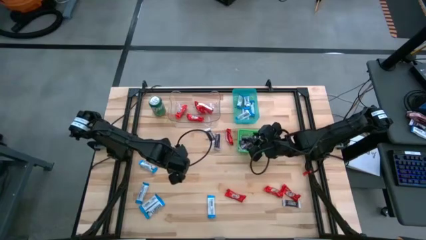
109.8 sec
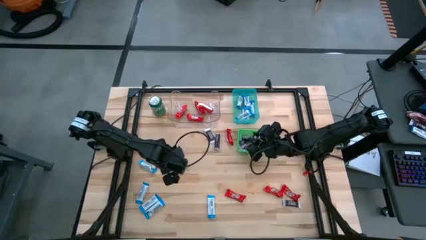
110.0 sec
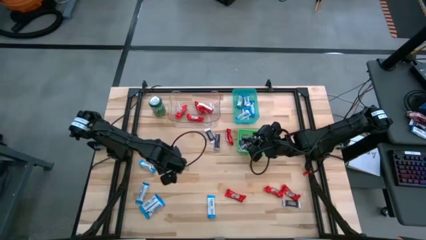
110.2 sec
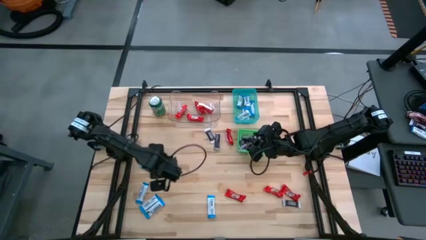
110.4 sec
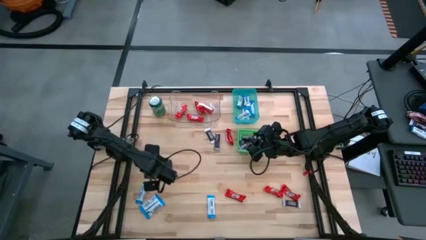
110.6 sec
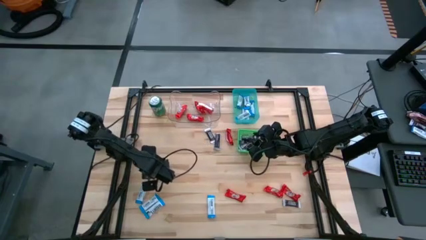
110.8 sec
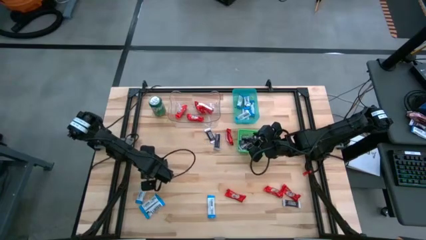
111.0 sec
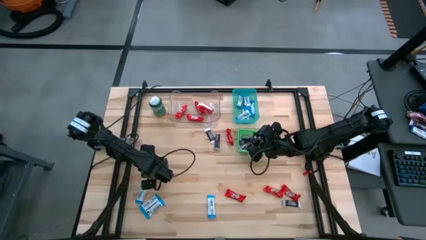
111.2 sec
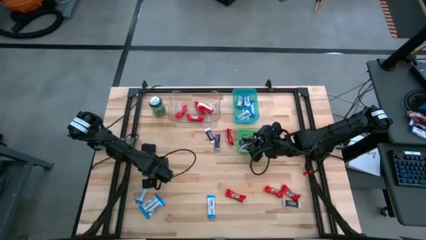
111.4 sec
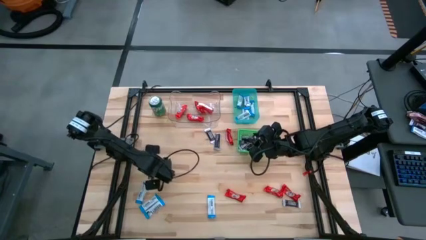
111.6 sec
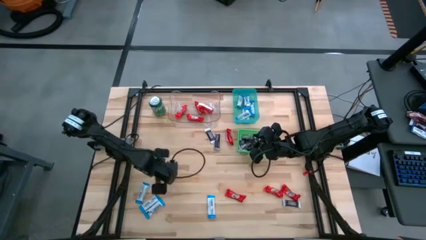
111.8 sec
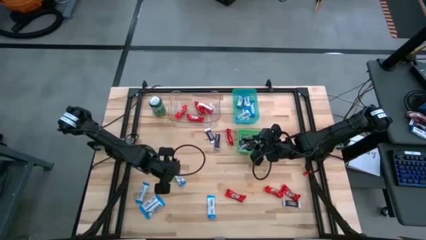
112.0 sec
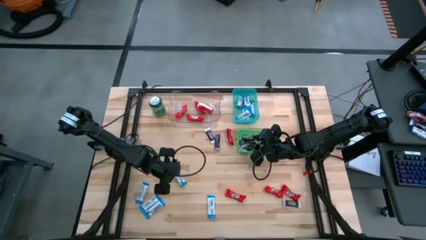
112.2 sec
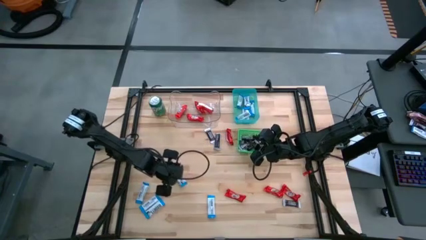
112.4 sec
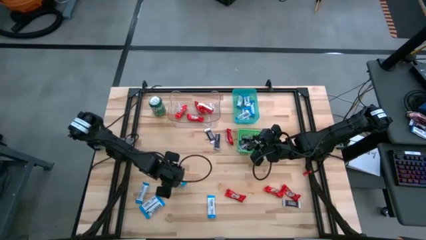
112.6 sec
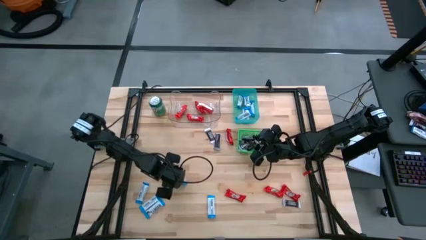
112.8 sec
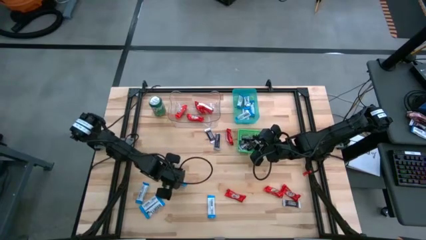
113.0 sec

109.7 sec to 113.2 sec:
Task: Sort candy
Put the white chocolate bar into the blue bin

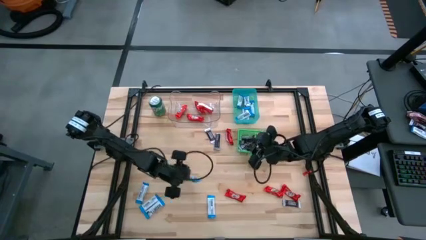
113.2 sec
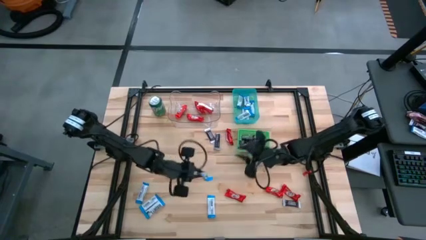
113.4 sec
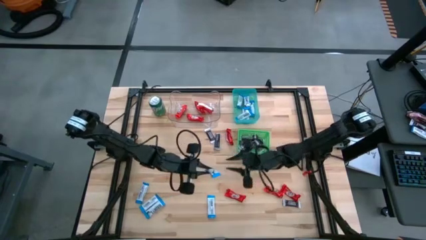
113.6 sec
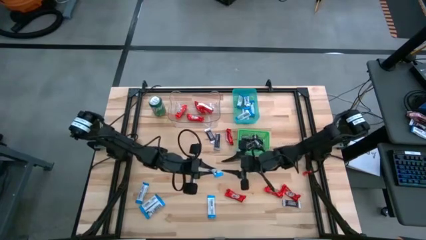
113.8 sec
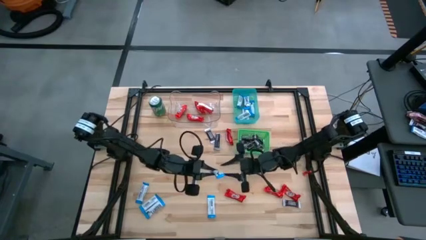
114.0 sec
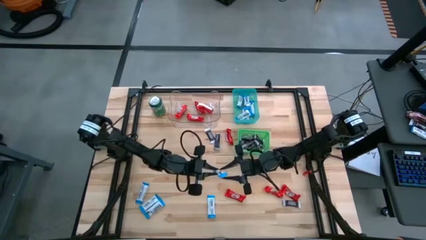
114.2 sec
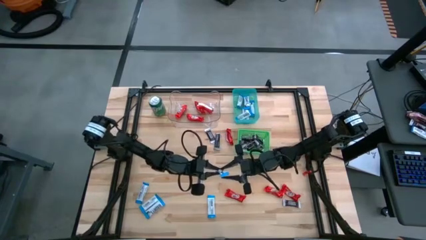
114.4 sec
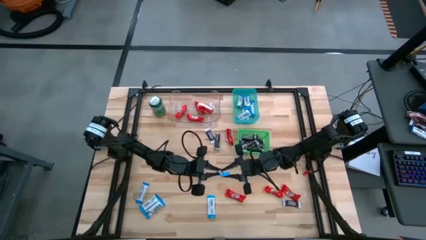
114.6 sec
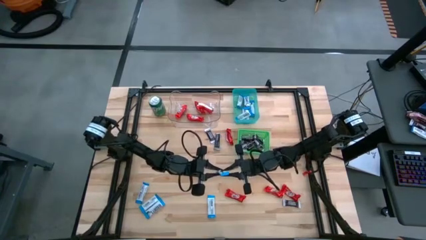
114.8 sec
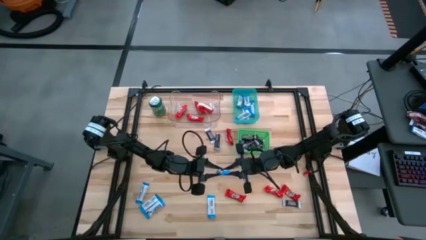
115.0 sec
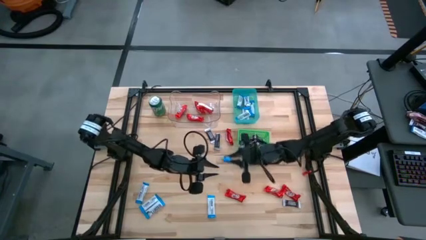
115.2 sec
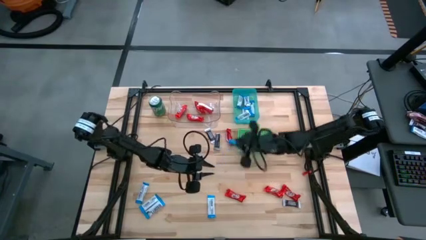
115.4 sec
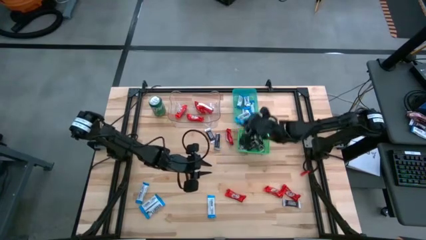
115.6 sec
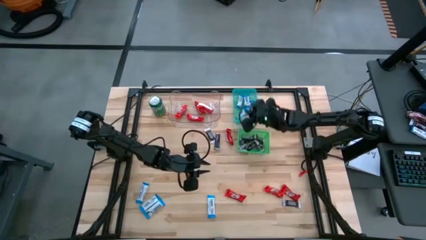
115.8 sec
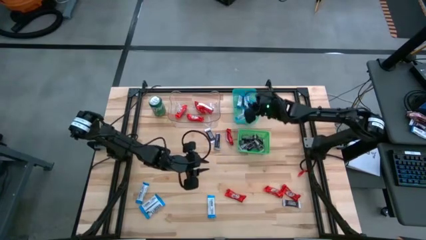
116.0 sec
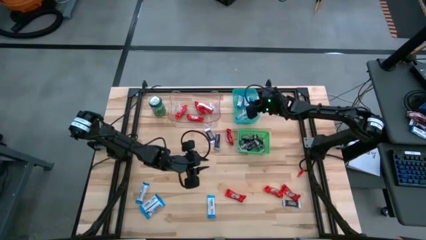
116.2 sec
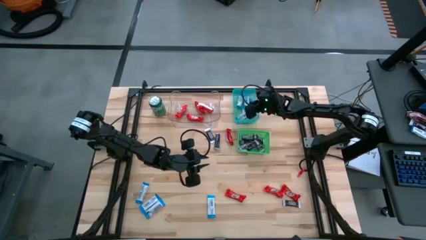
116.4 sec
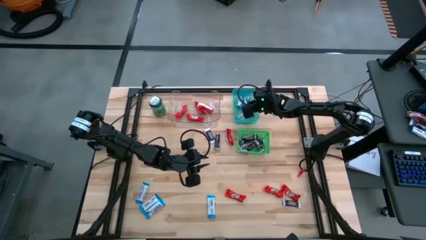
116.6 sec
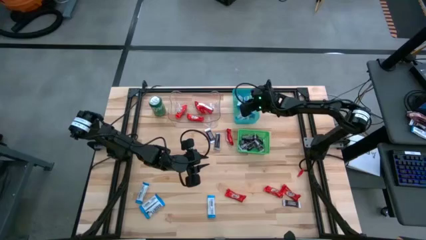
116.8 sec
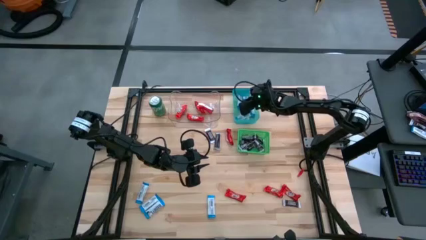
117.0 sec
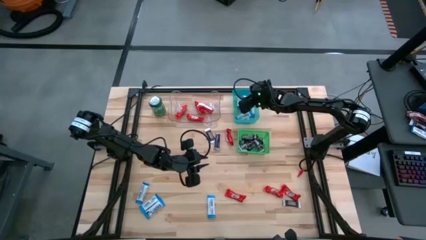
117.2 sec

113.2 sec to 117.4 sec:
Put the white chocolate bar into the blue bin

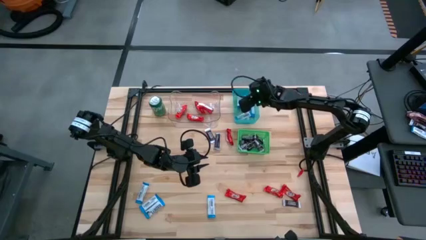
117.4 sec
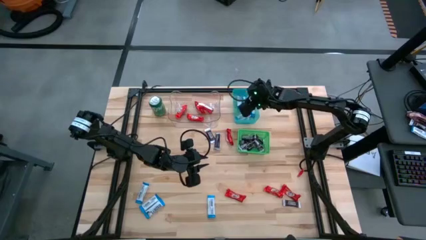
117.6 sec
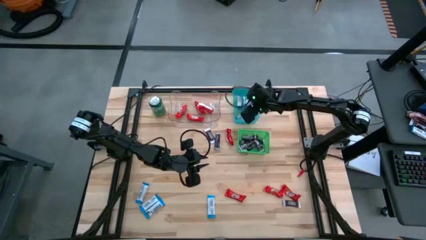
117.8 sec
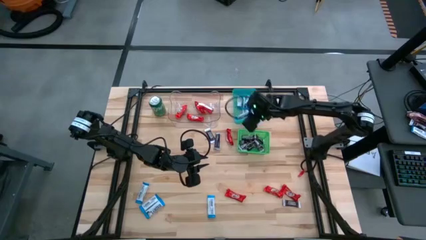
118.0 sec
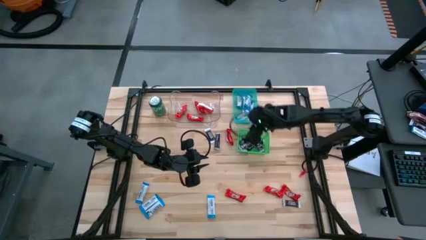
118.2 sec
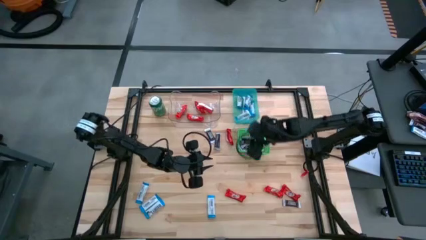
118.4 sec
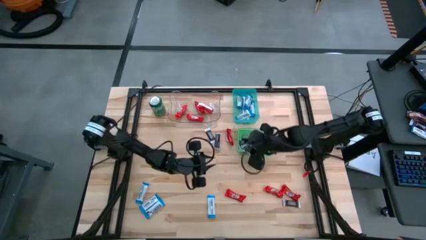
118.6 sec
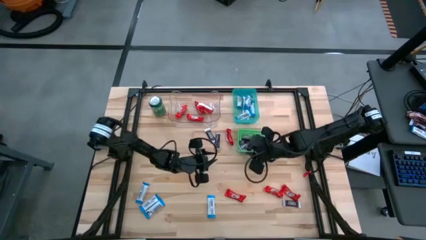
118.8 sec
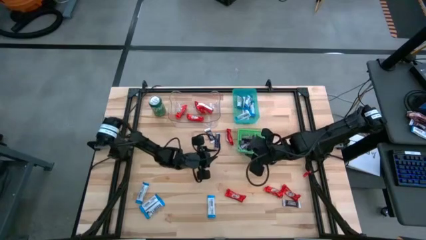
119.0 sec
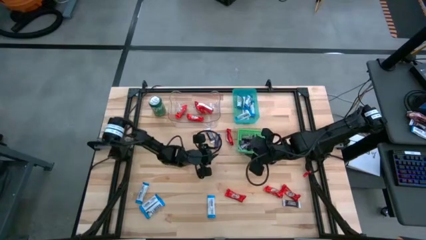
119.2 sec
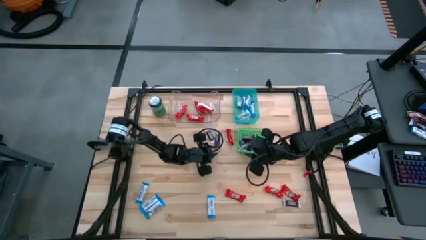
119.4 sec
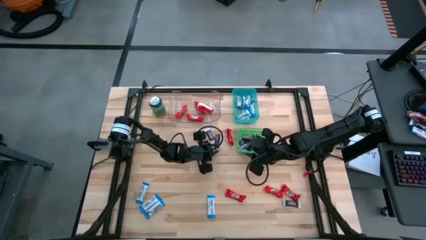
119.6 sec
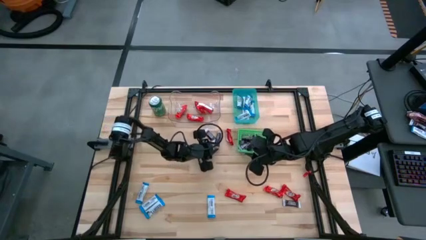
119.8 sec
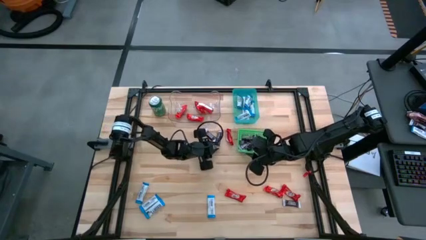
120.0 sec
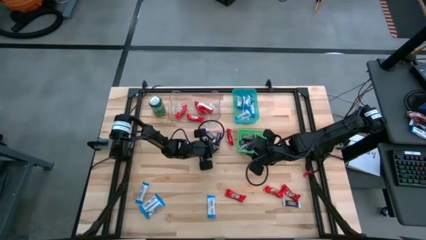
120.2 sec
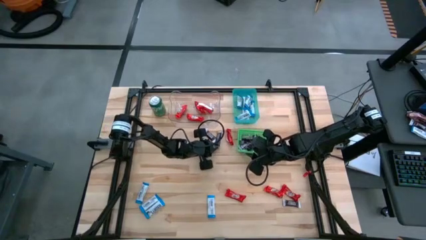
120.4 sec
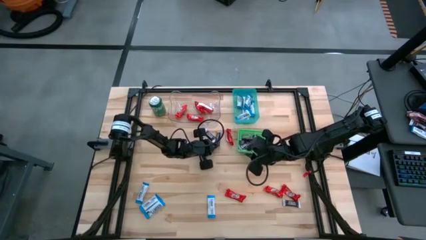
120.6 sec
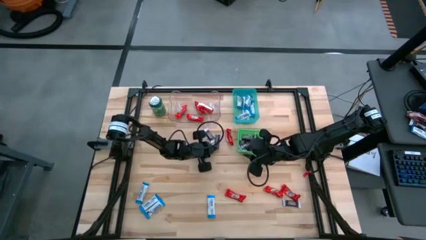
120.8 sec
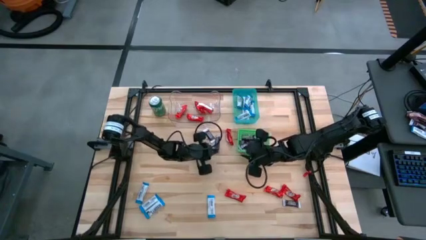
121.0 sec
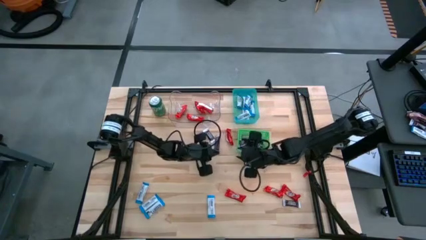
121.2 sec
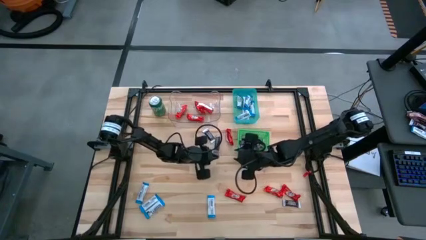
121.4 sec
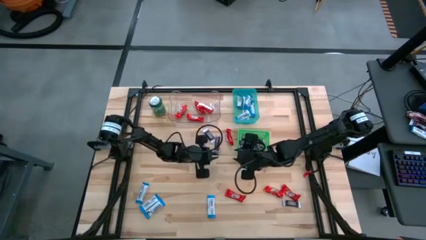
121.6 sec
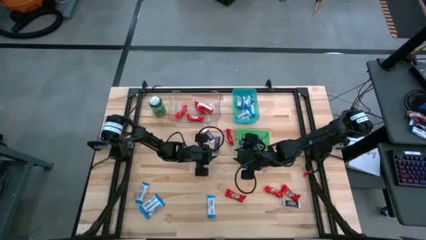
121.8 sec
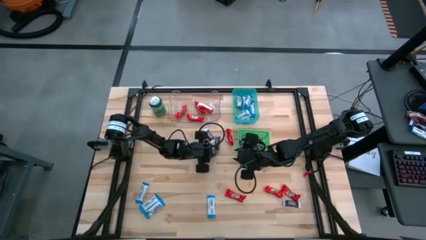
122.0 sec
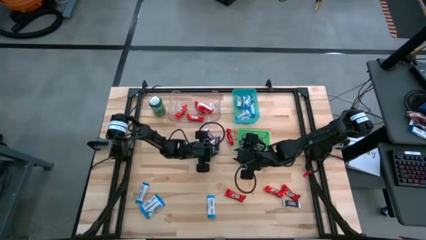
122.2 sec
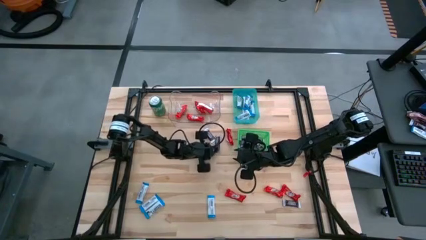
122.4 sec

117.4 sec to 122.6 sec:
Put the brown chocolate bar into the green bin

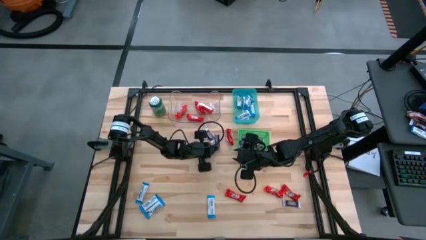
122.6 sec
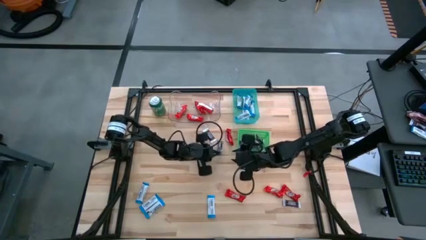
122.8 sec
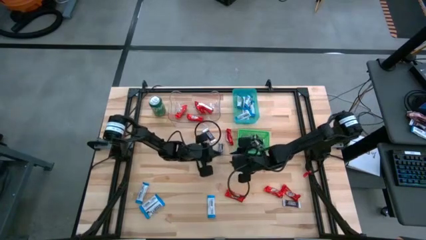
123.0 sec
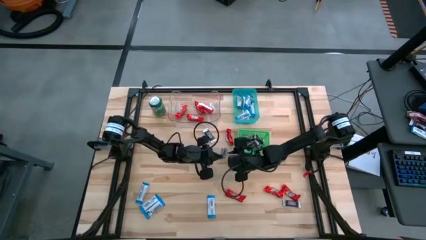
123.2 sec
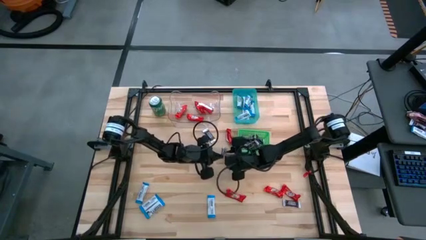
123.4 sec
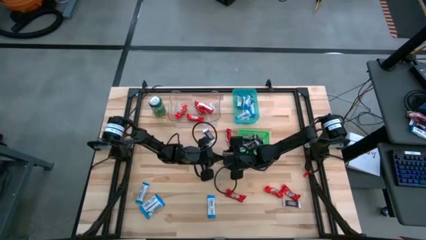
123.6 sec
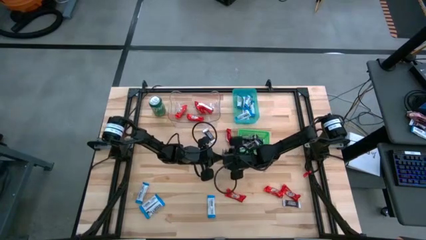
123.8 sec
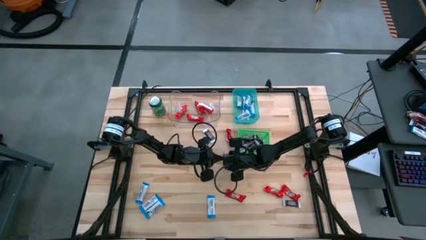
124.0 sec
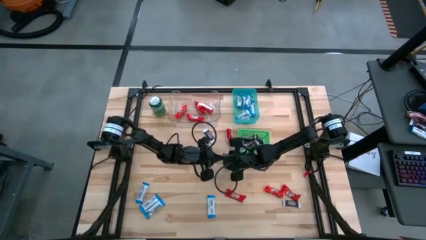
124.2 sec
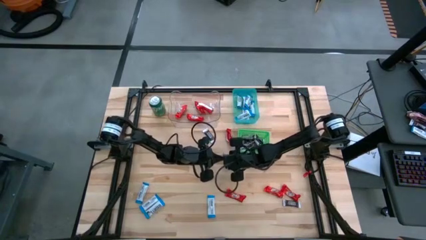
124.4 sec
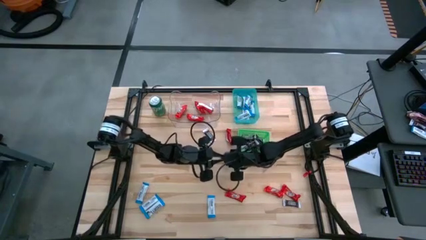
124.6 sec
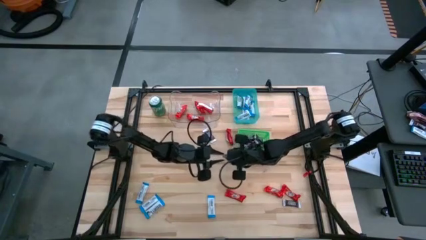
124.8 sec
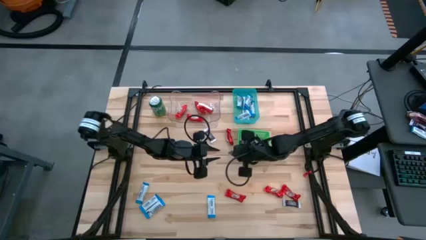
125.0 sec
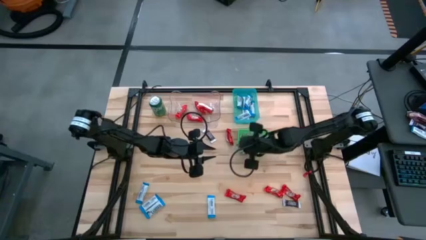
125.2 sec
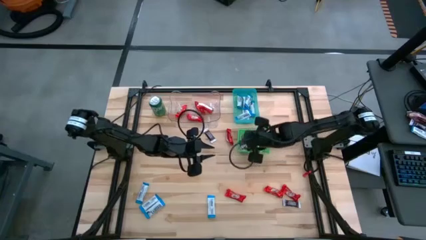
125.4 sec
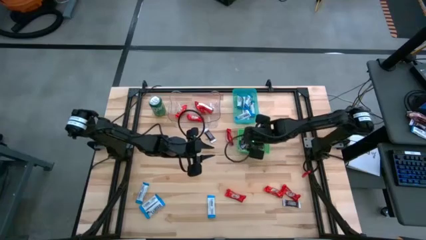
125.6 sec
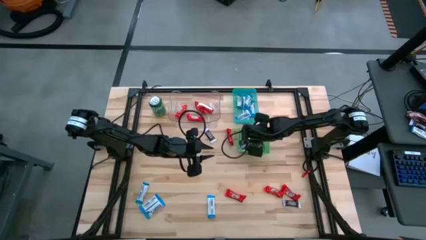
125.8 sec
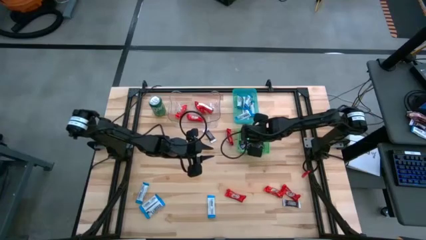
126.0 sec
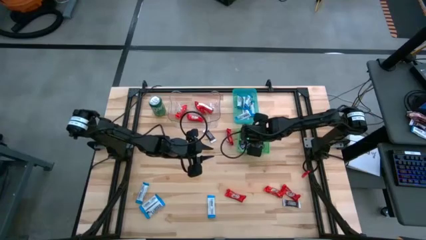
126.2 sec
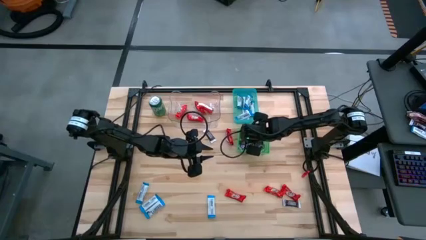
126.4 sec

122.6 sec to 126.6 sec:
Put the brown chocolate bar into the green bin
